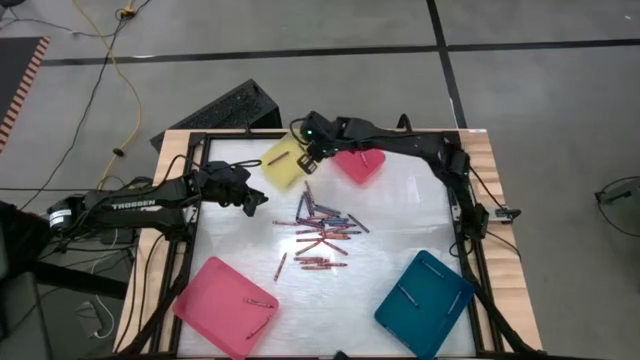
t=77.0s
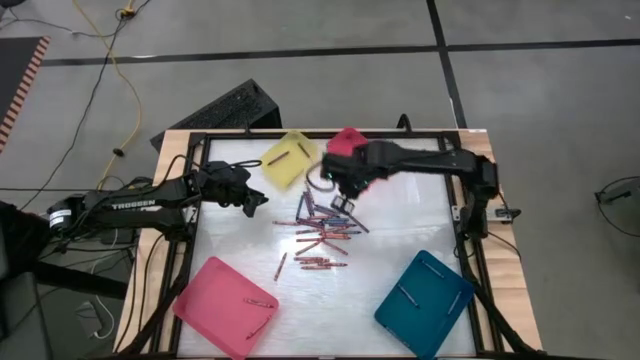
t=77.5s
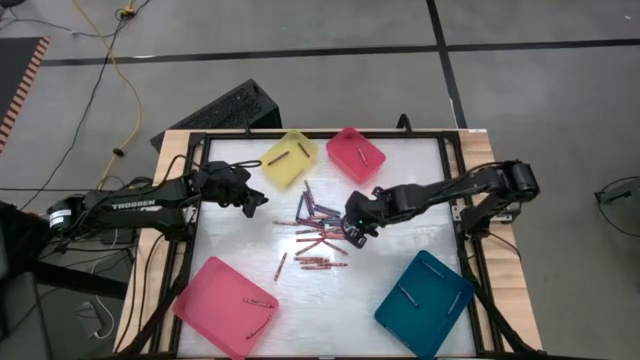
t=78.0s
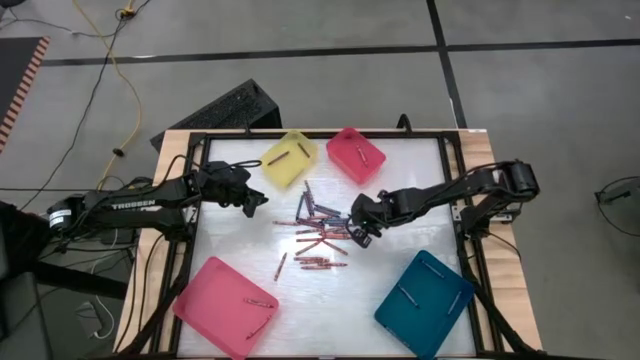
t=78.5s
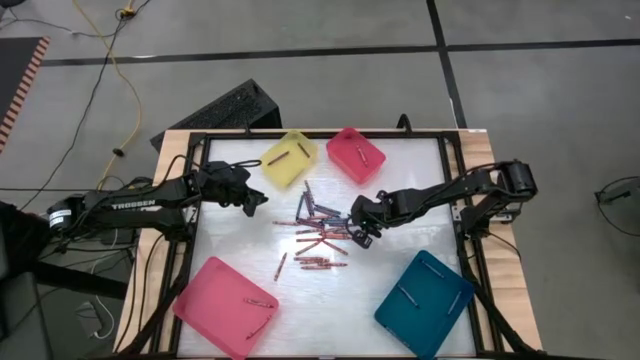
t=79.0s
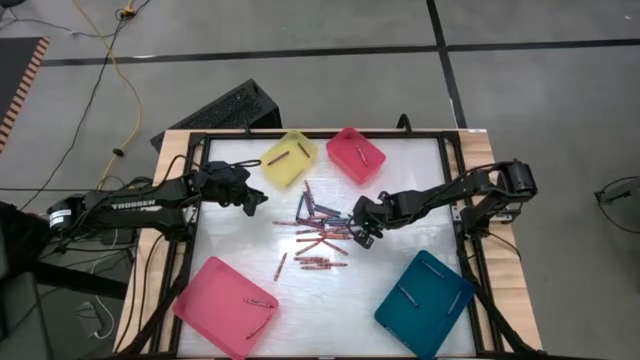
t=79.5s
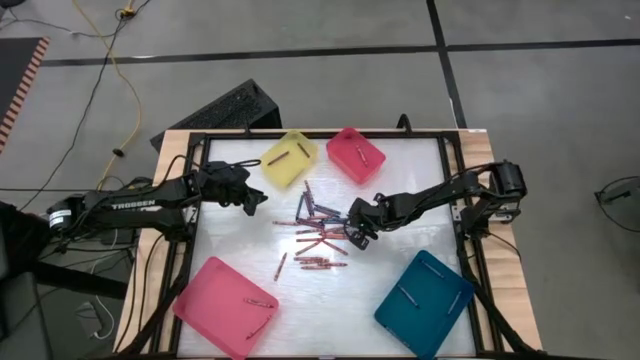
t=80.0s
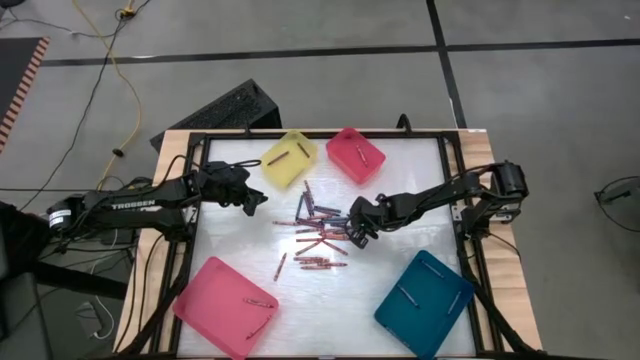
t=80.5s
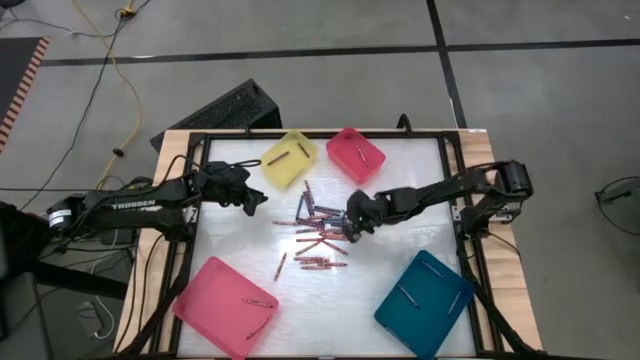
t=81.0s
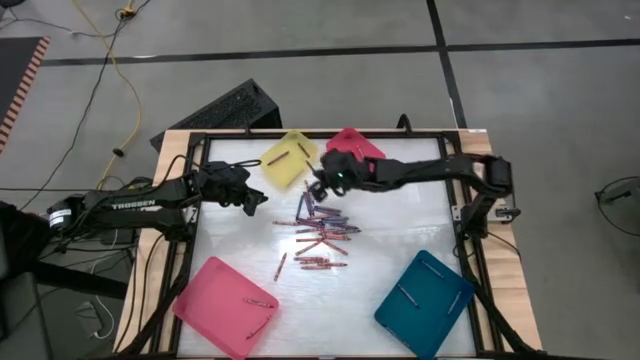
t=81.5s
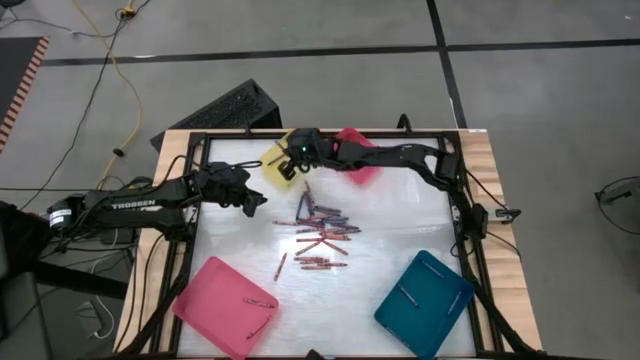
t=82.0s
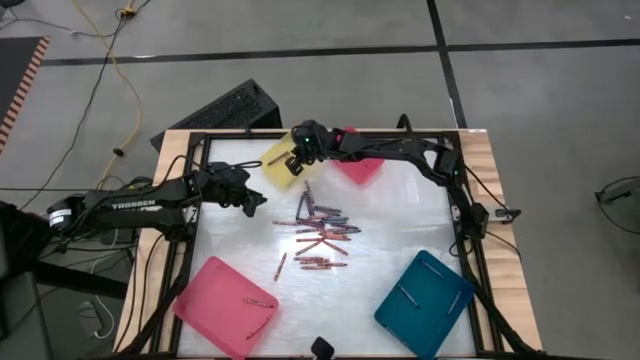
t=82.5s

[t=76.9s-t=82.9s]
Task: Sort crayons
Put the purple crayon into the yellow bin

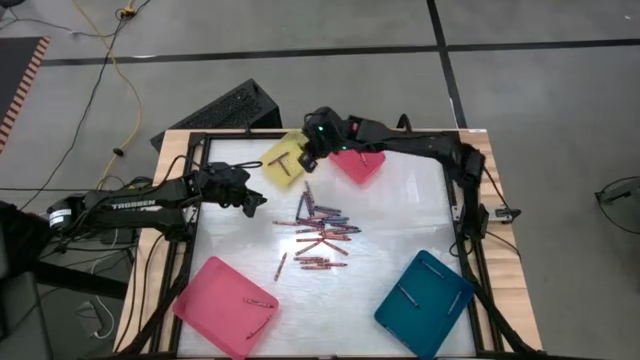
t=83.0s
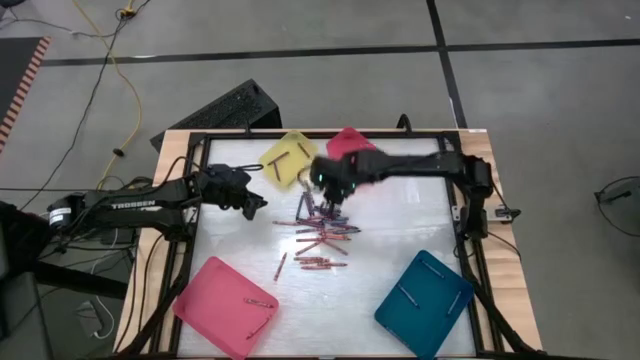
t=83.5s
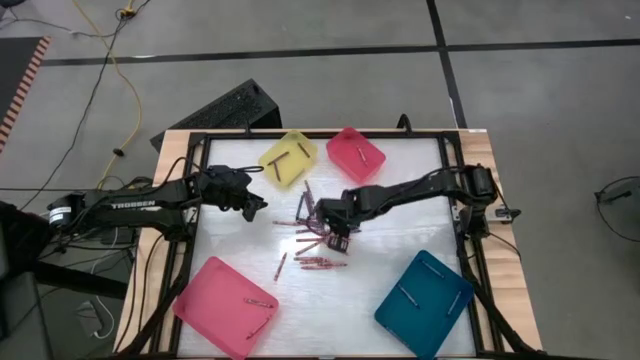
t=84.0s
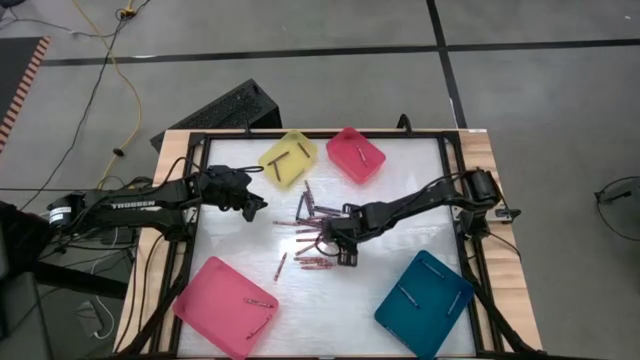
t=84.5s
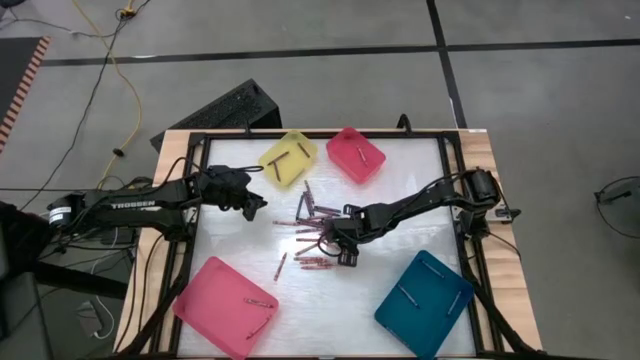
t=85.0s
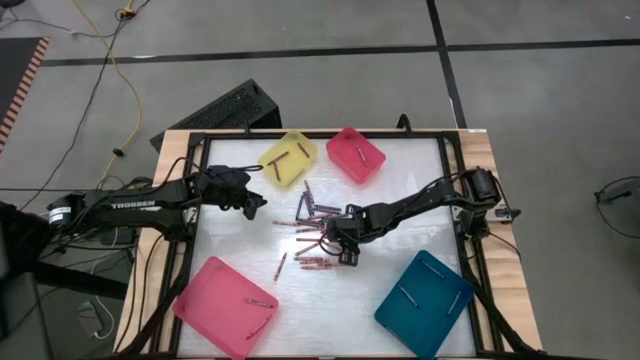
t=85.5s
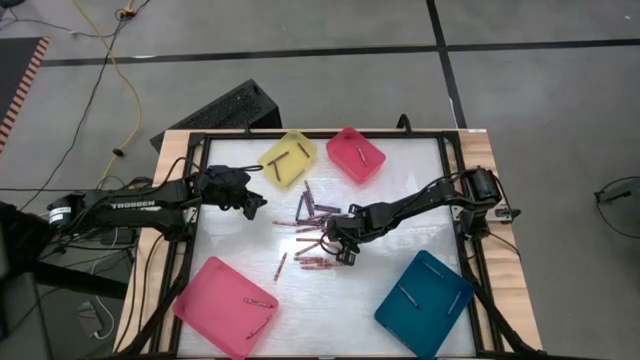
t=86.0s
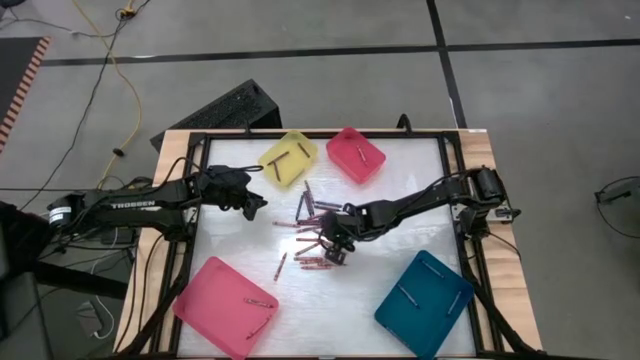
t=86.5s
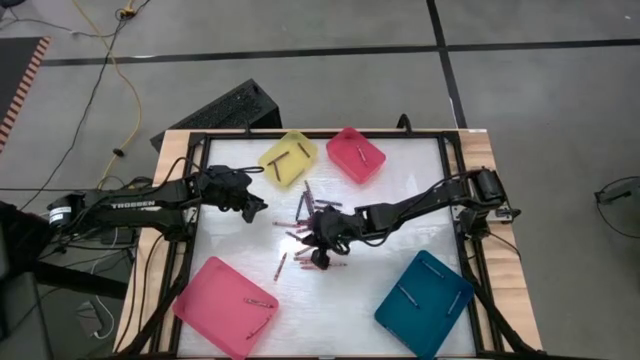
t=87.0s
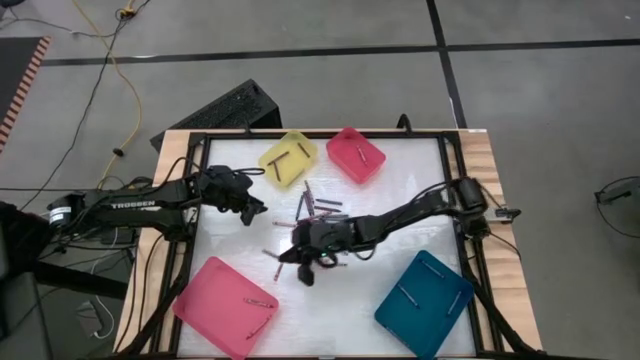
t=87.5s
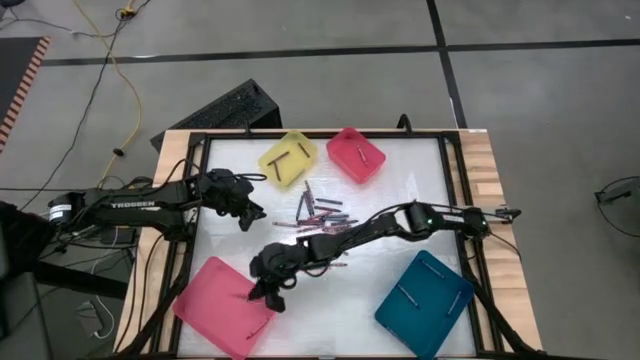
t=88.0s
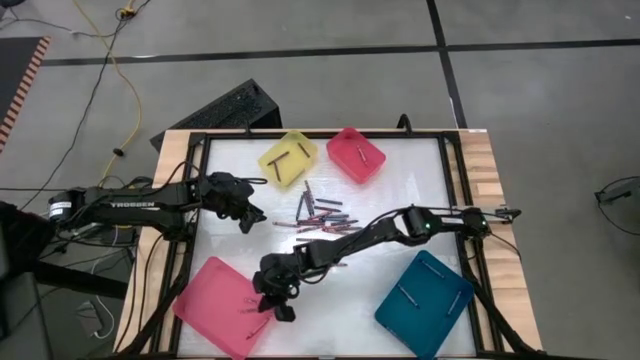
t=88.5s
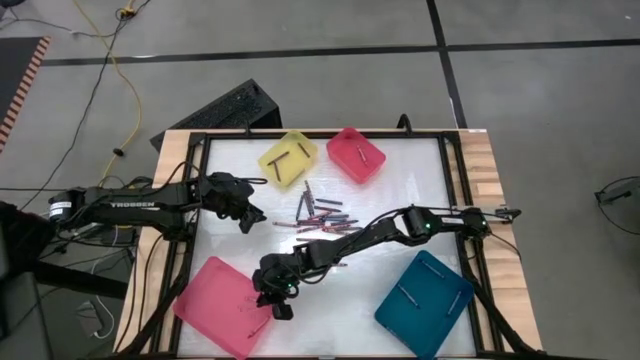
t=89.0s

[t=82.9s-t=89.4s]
Put the red crayon into the pink bin

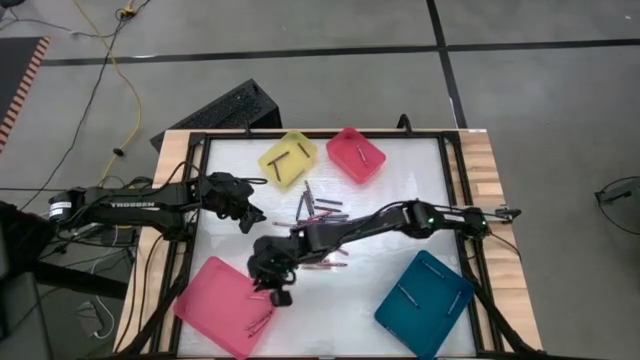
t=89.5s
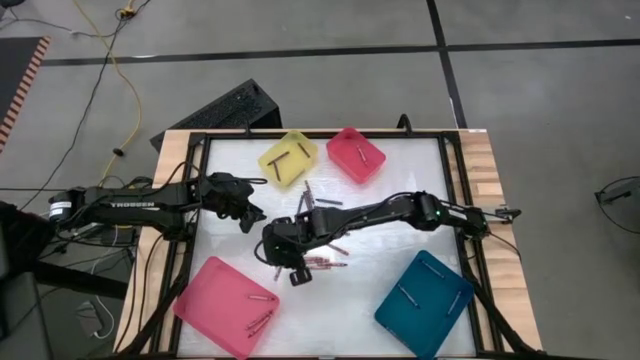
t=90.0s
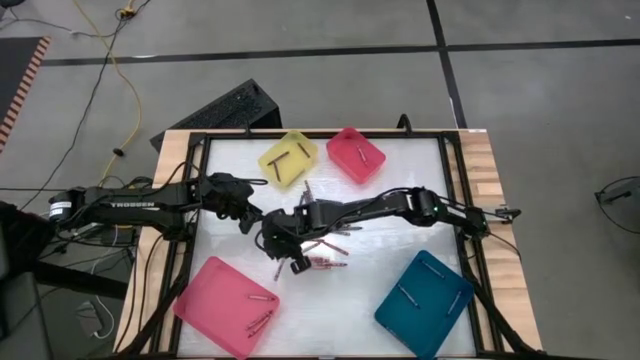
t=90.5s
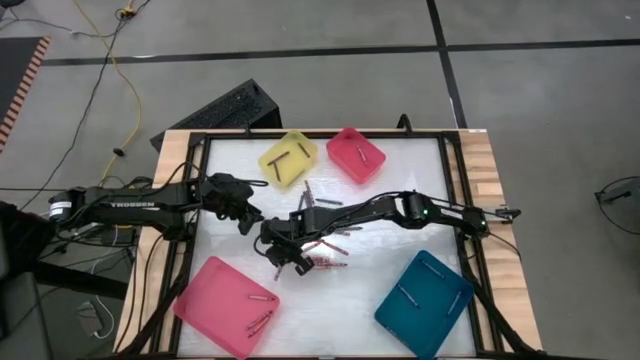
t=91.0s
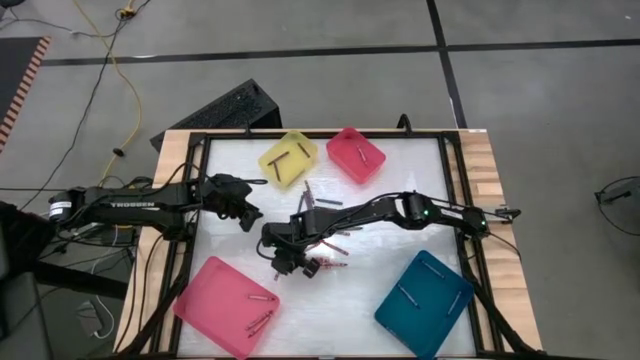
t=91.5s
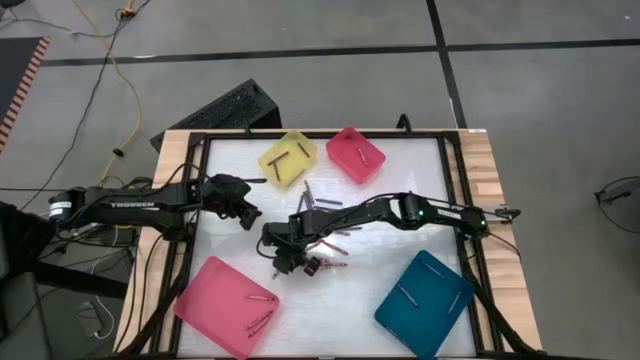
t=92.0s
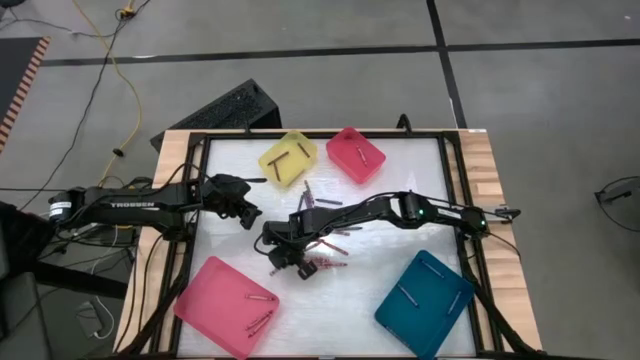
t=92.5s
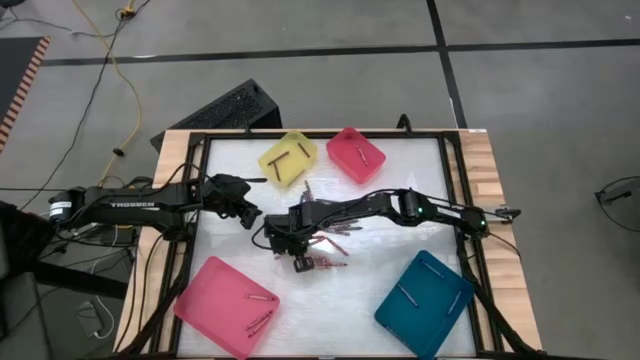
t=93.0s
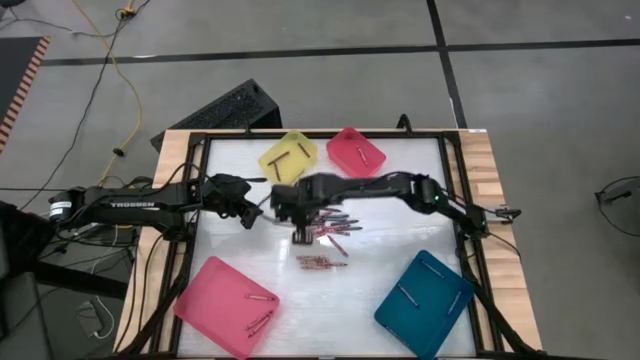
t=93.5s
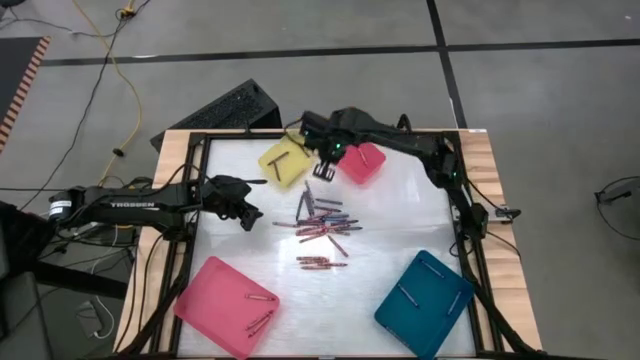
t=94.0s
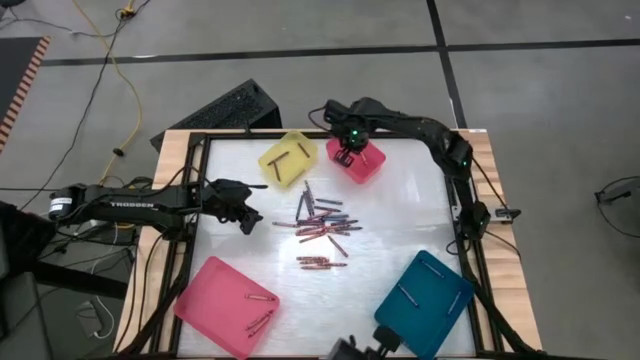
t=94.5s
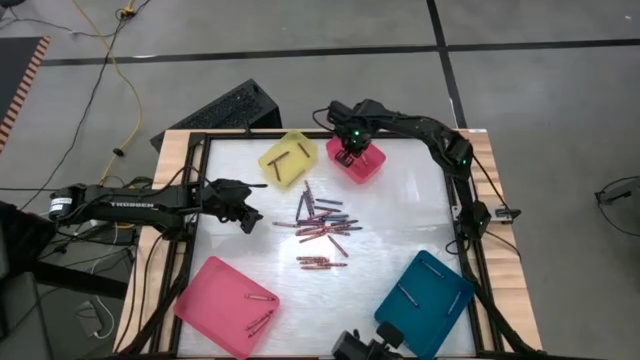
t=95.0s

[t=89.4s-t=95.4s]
Put the pink crayon into the red bin

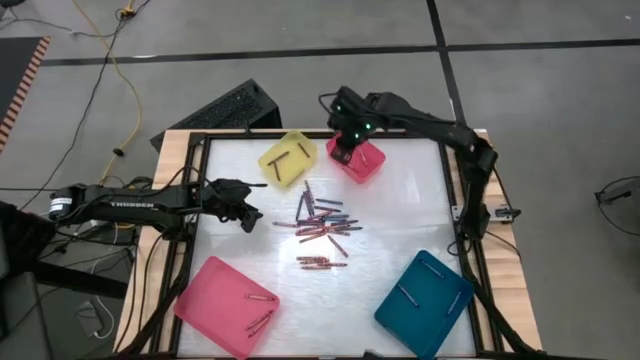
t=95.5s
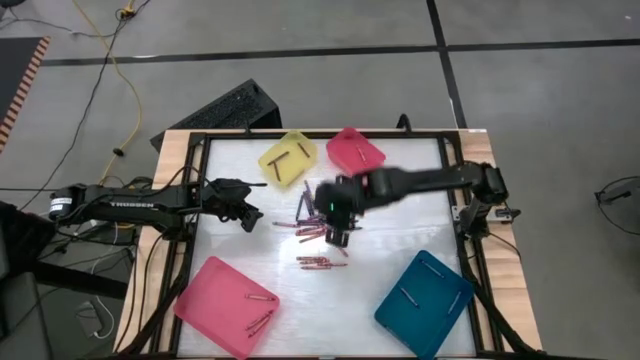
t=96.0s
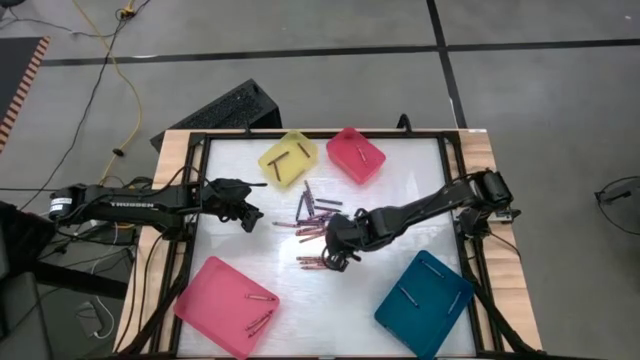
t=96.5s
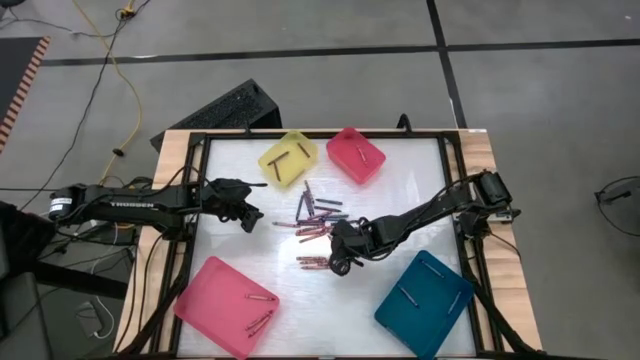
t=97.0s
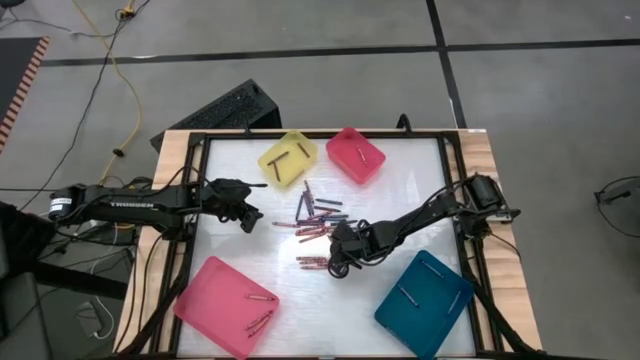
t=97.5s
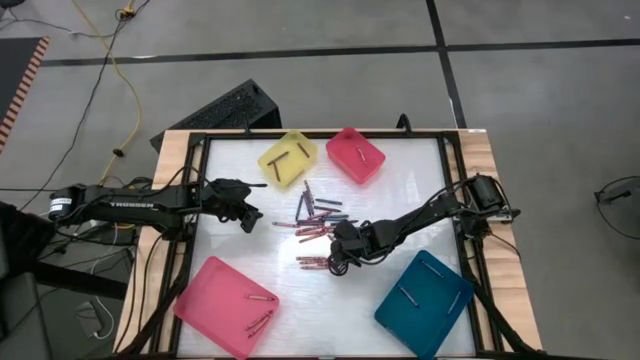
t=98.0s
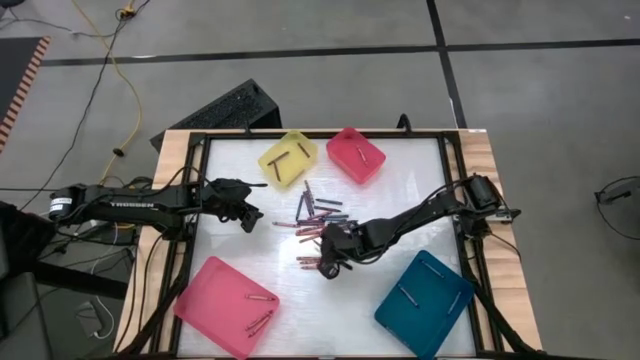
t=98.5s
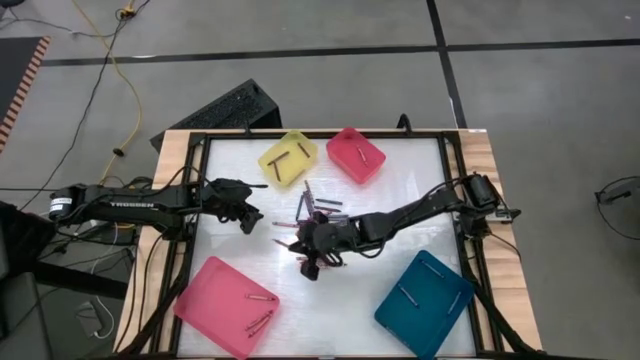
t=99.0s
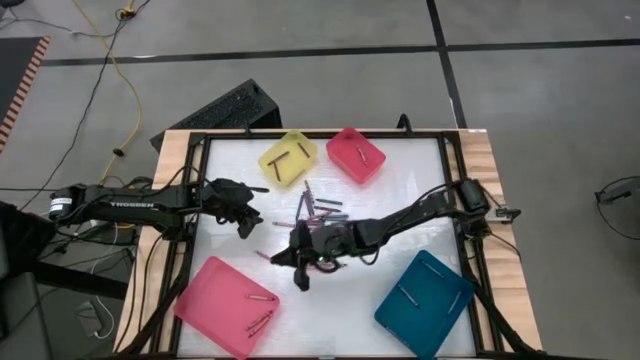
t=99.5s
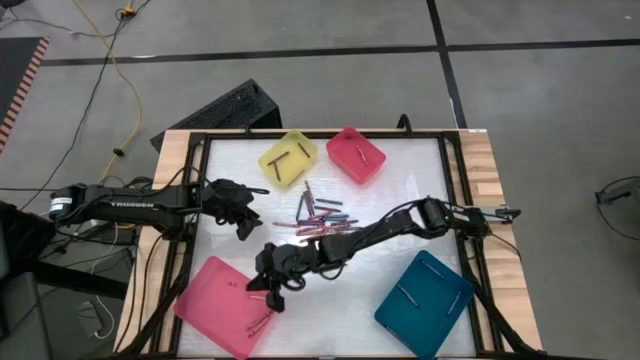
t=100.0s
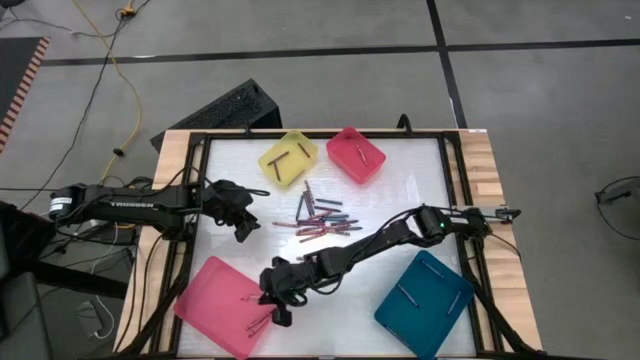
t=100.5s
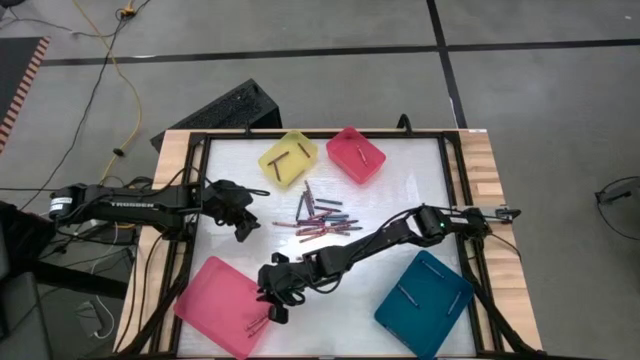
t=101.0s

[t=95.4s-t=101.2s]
Put the red crayon into the pink bin
